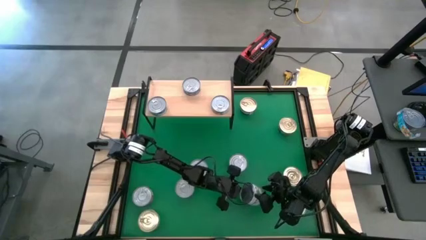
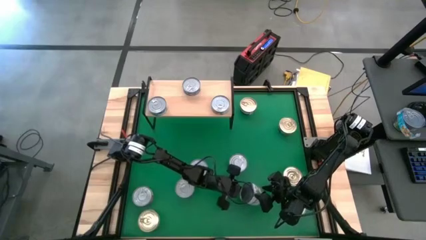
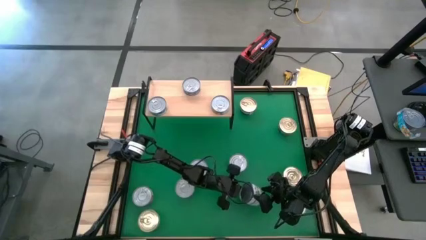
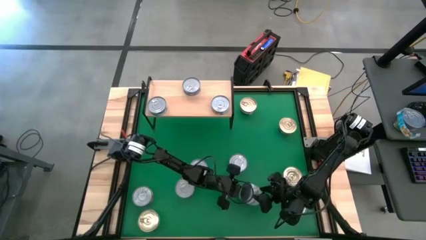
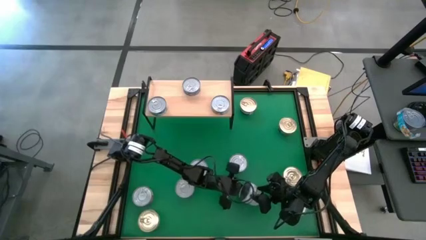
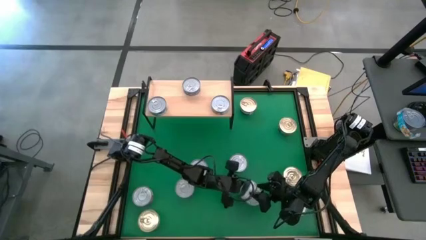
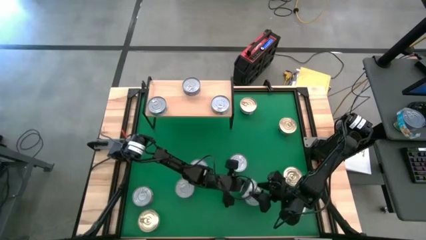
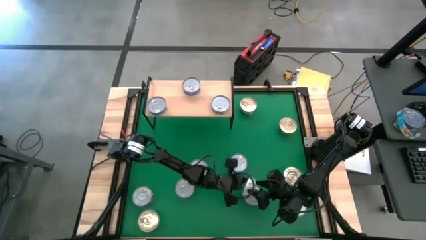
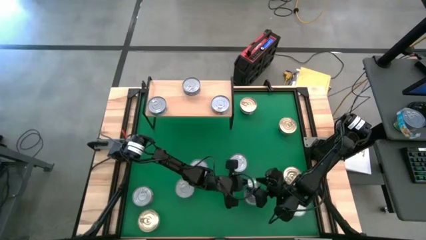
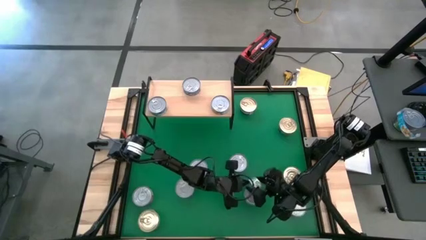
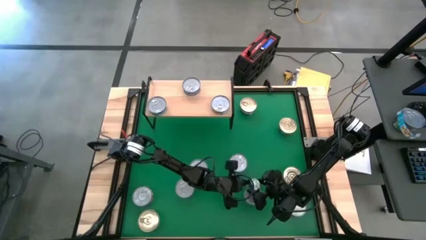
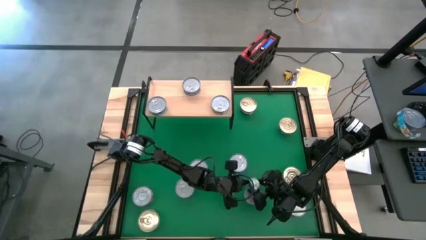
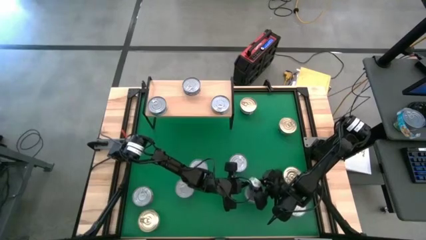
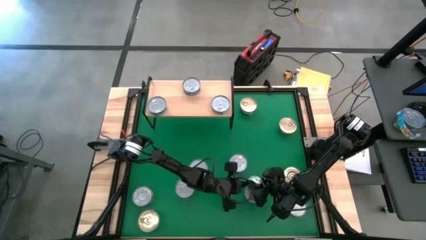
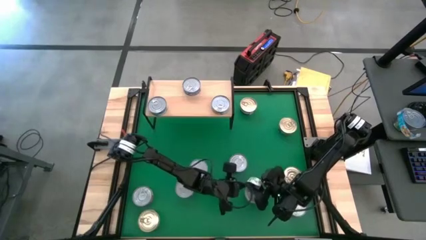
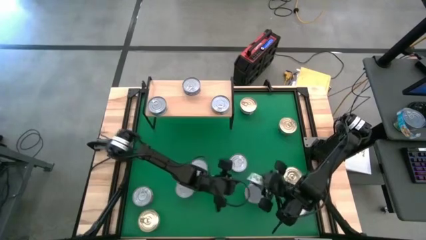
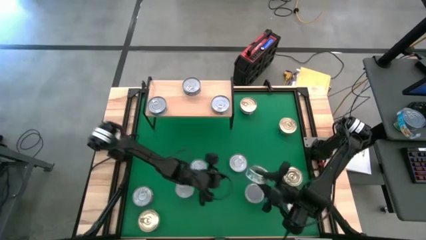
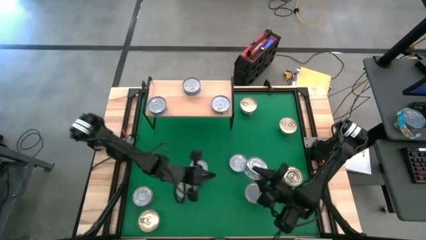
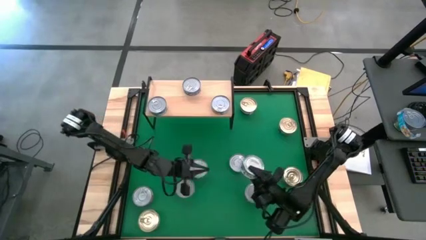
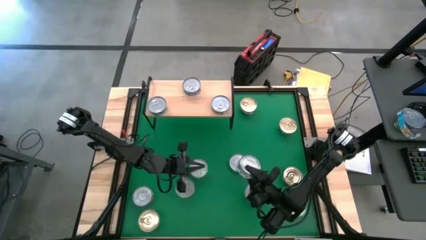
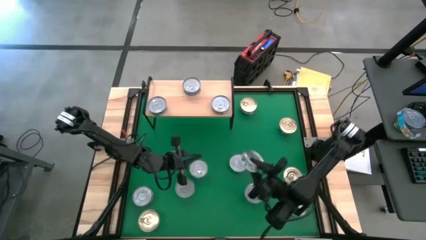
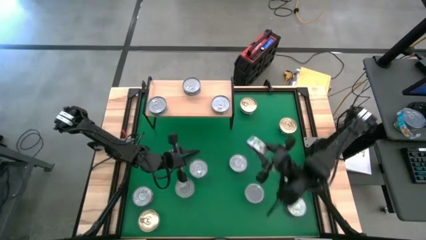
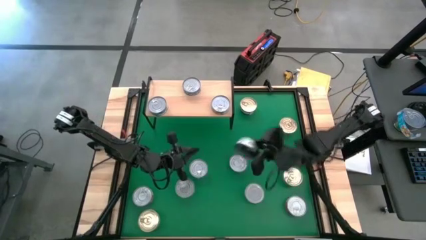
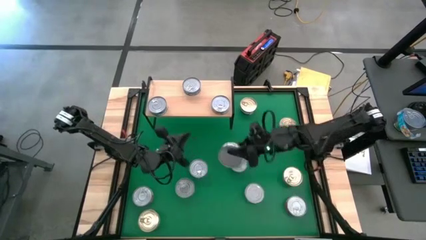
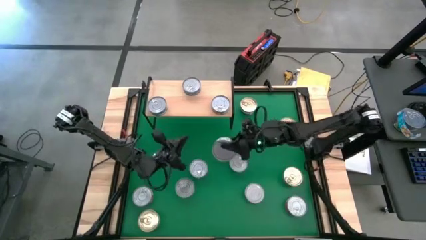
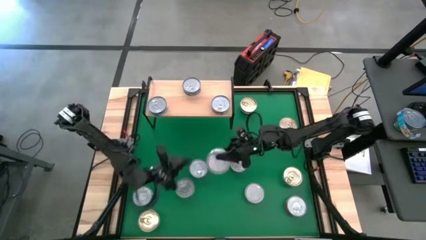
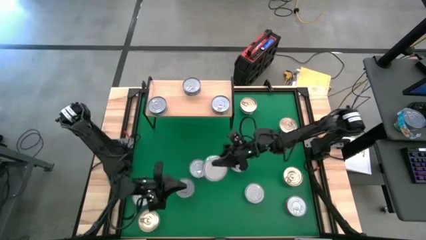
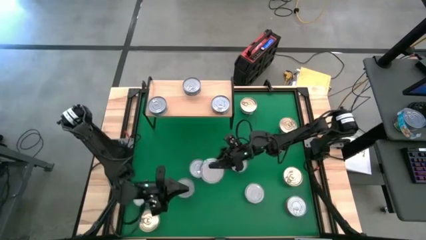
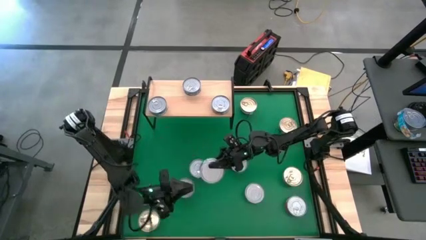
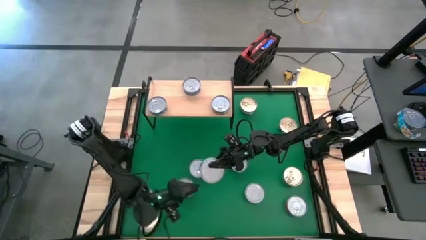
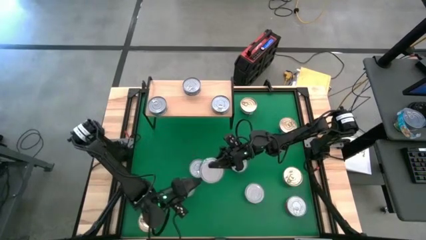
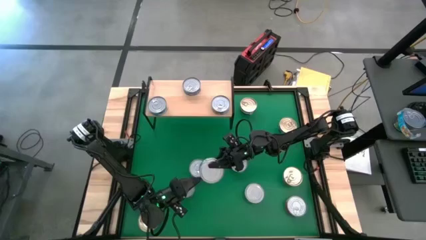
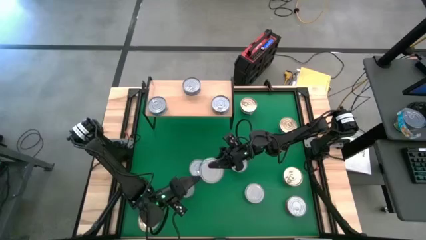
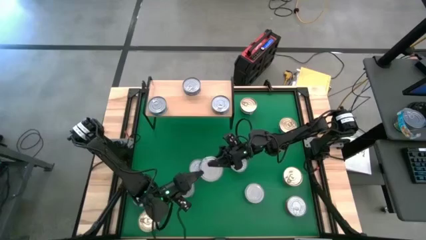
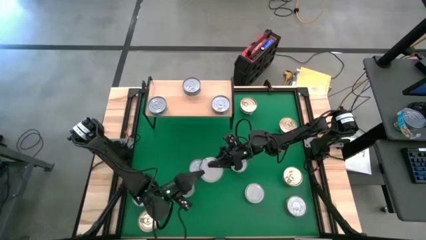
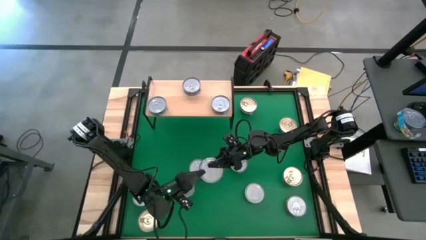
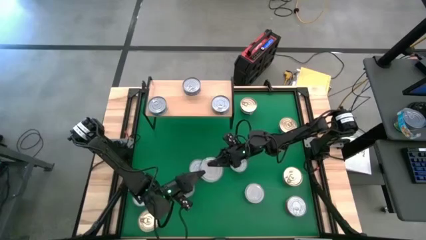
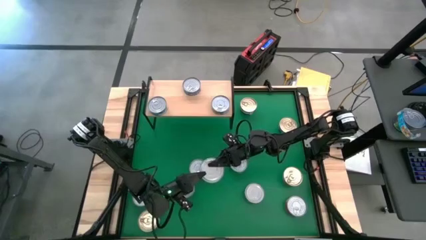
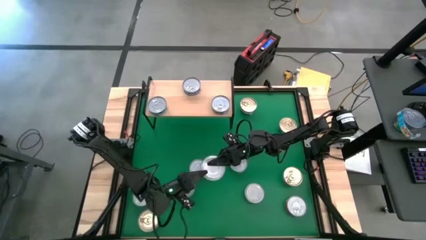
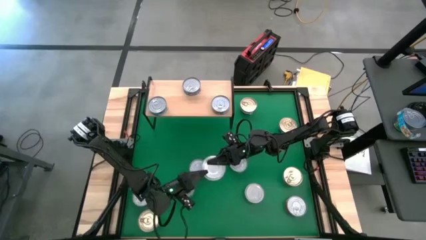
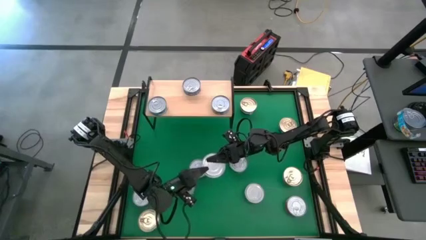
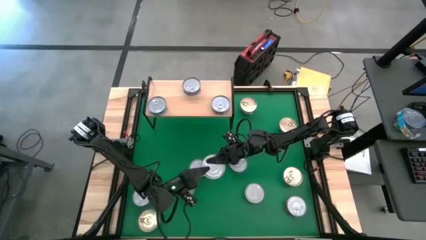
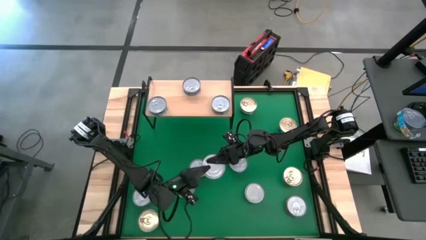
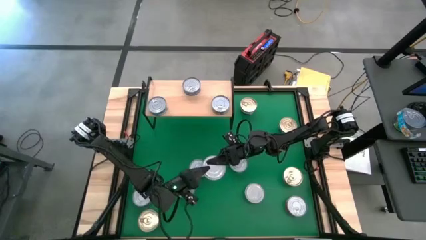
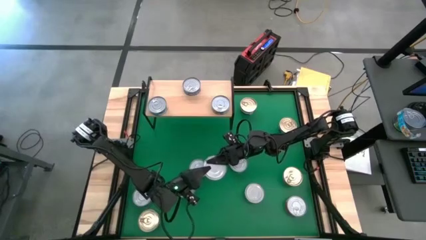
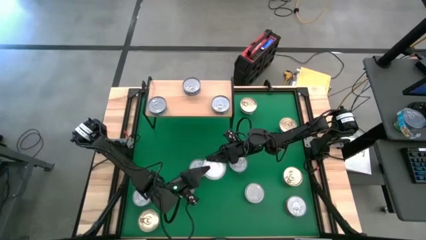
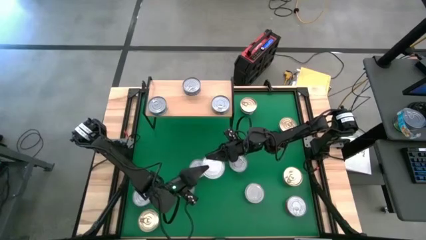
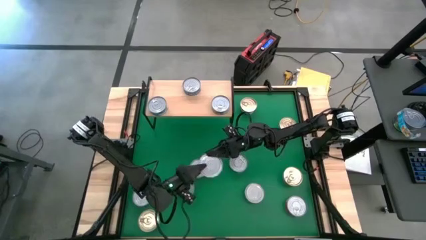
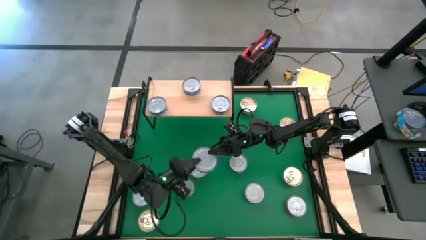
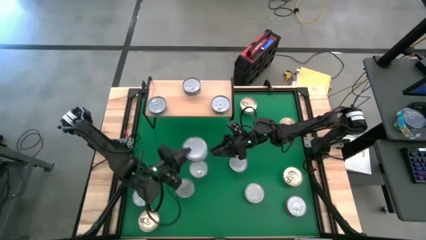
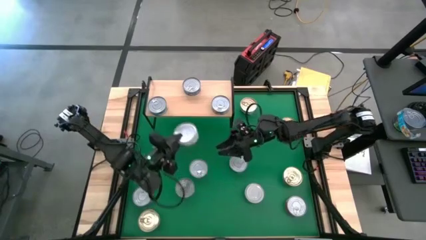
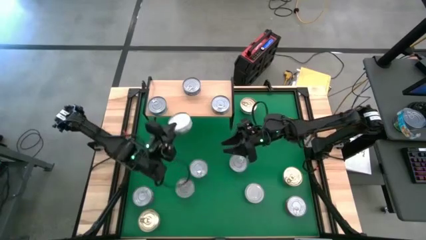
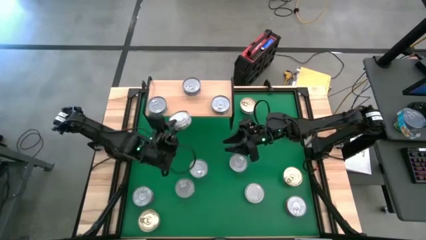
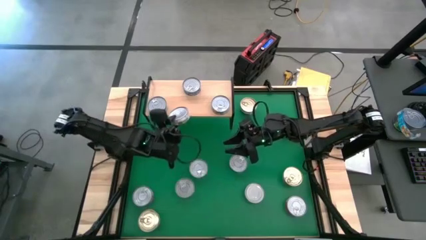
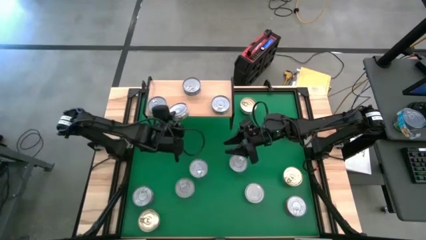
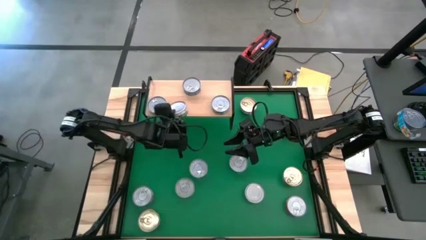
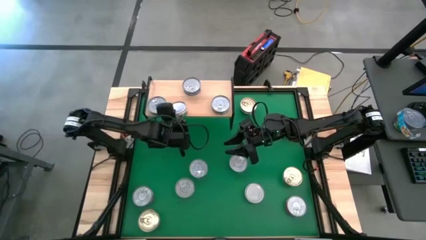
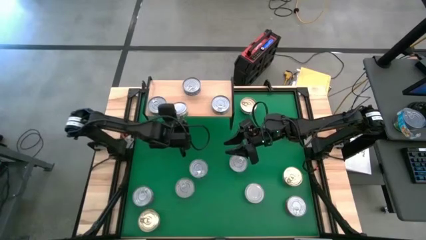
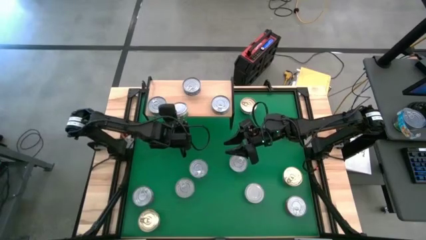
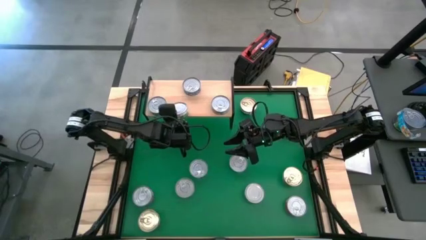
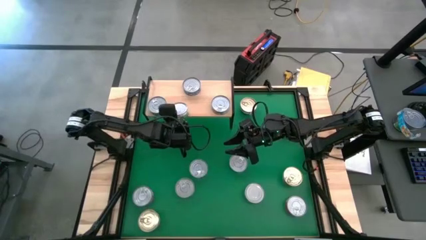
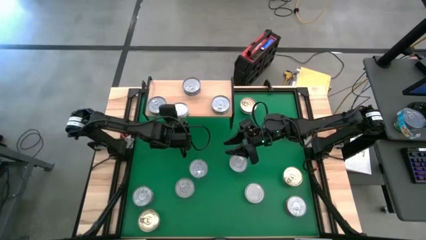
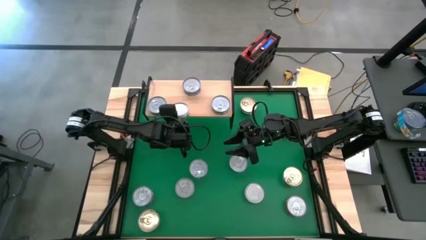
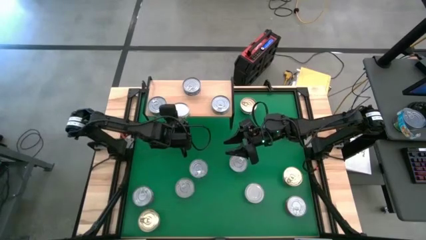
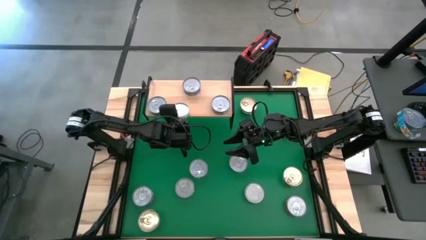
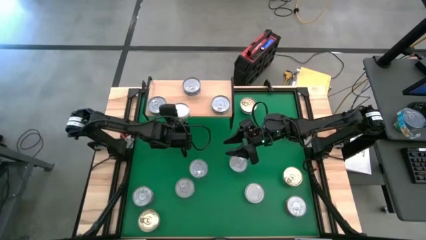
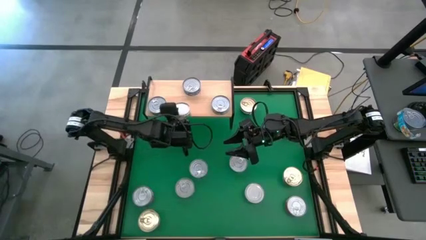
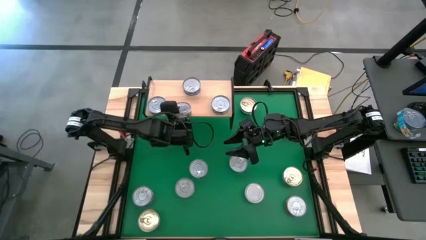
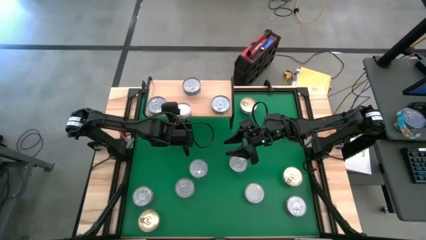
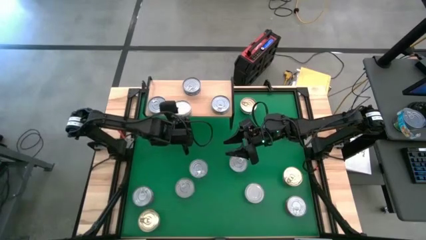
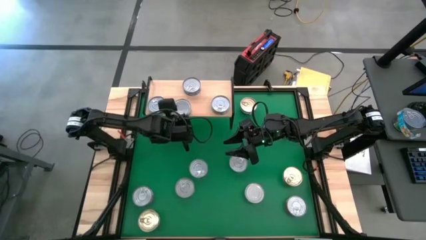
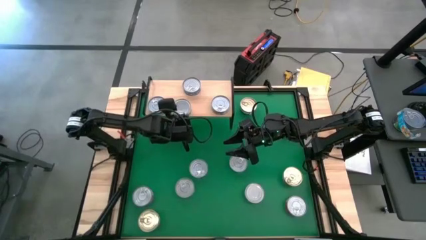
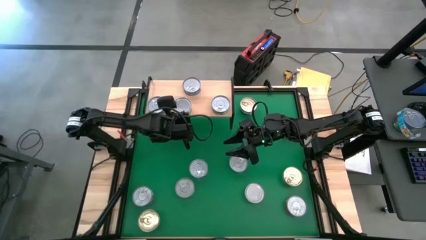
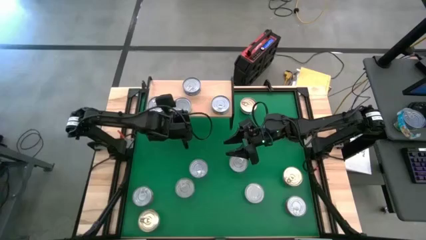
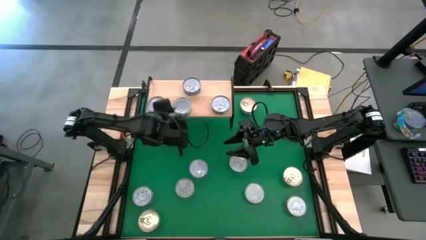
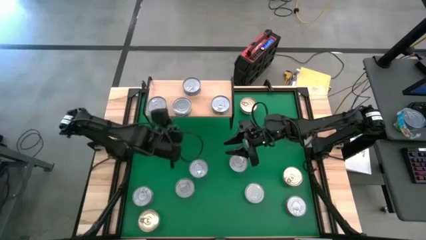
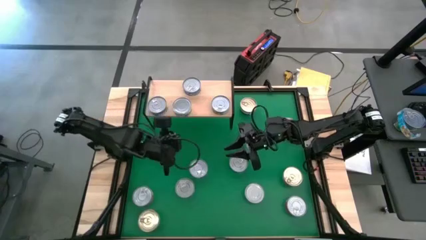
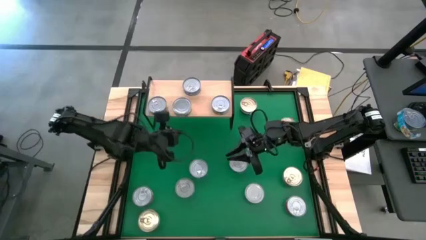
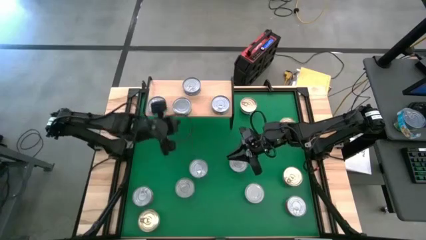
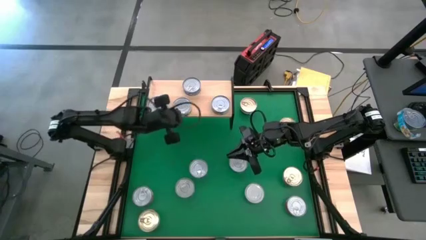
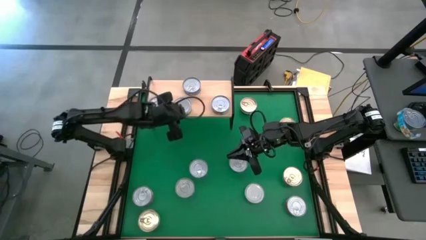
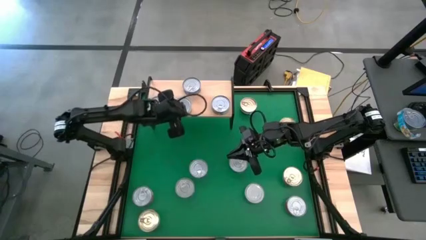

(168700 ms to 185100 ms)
Task: Stack canned seafood by type on shelf
Put the bottom right white tuna can on the shelf
